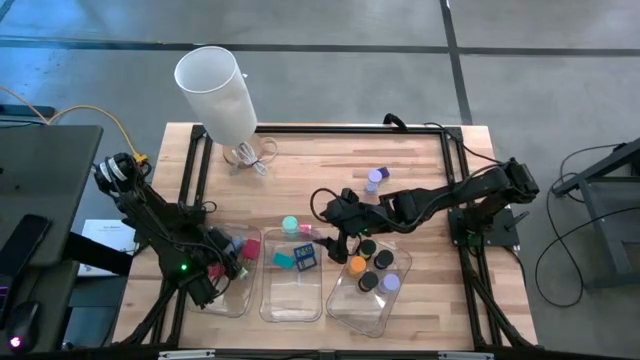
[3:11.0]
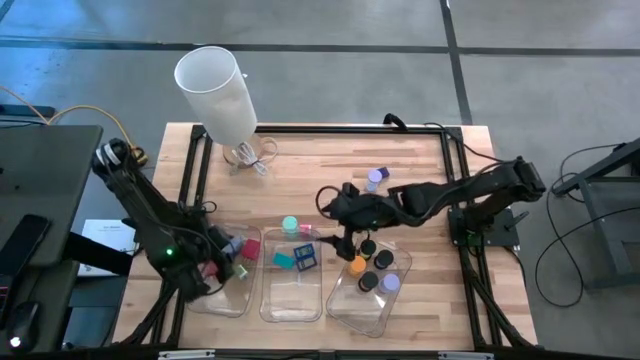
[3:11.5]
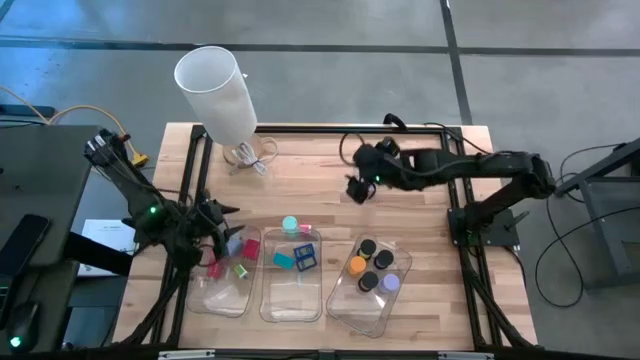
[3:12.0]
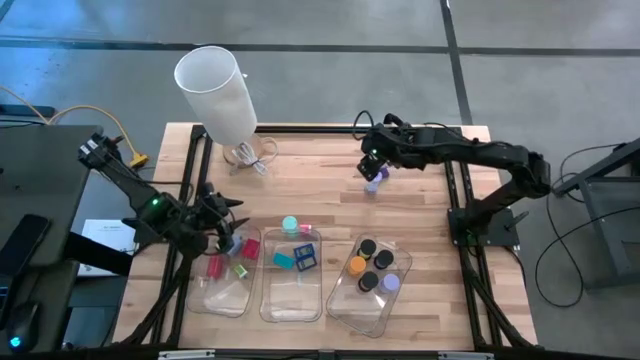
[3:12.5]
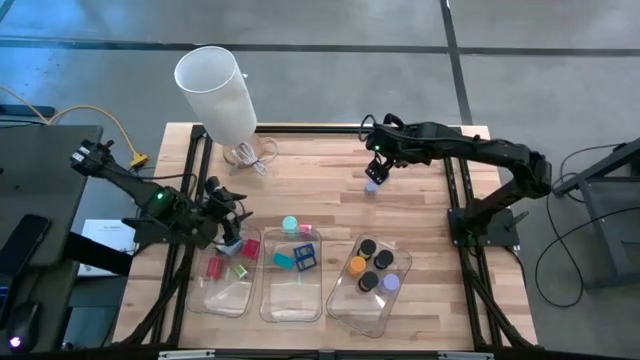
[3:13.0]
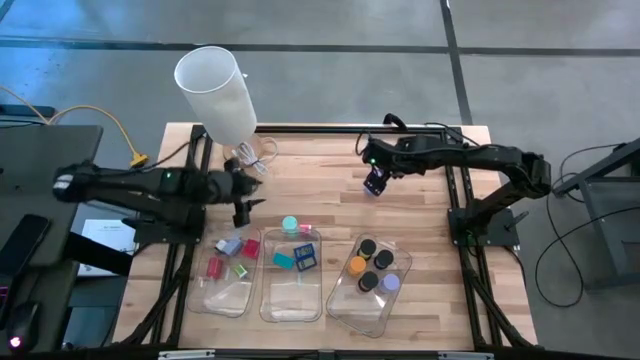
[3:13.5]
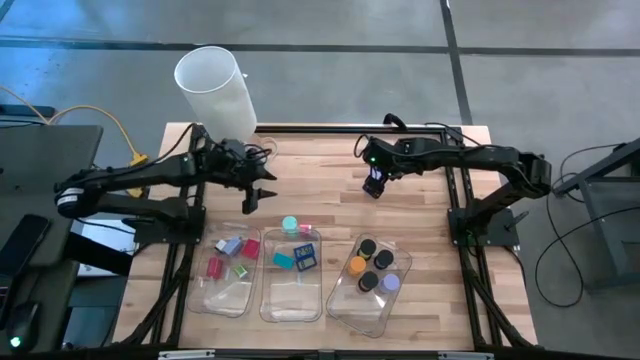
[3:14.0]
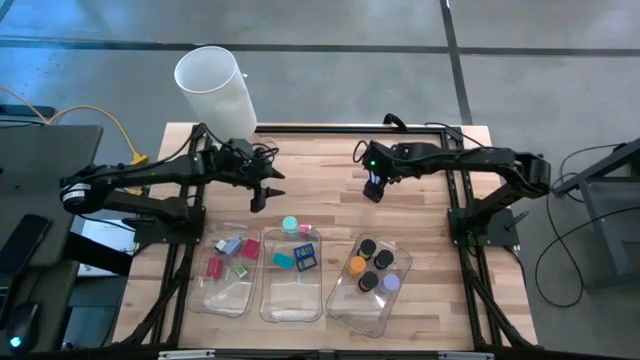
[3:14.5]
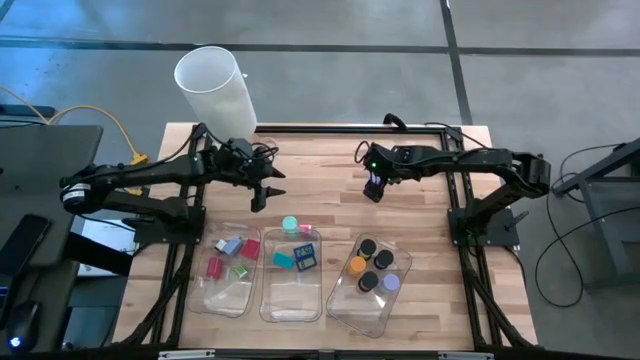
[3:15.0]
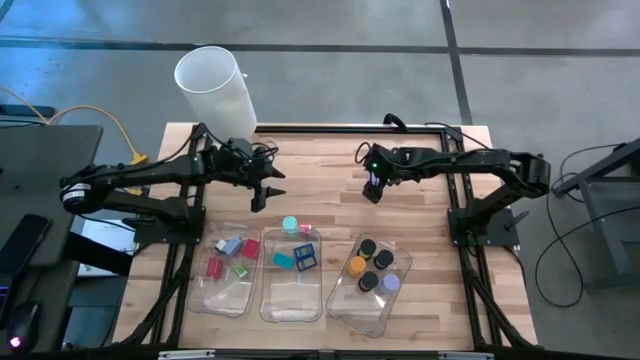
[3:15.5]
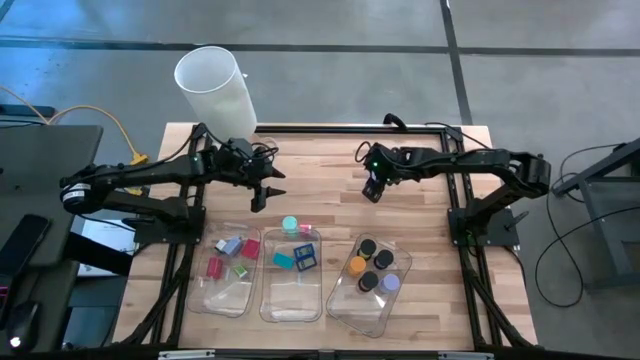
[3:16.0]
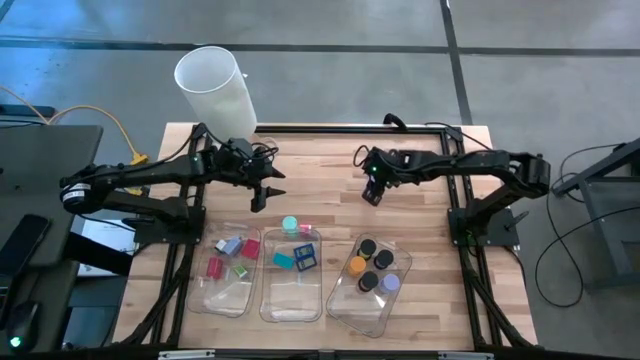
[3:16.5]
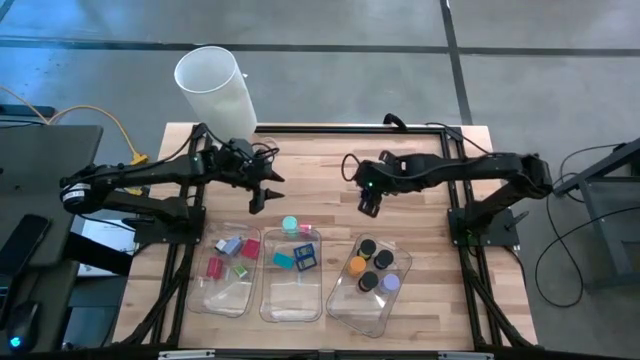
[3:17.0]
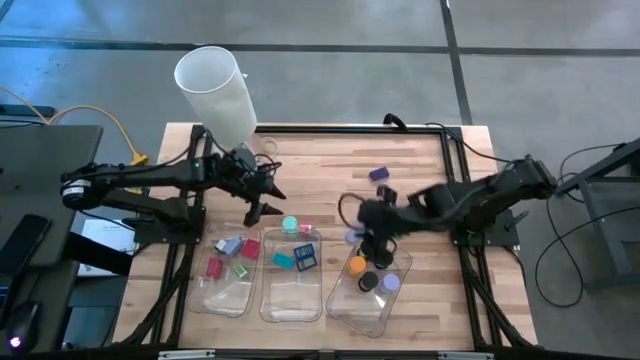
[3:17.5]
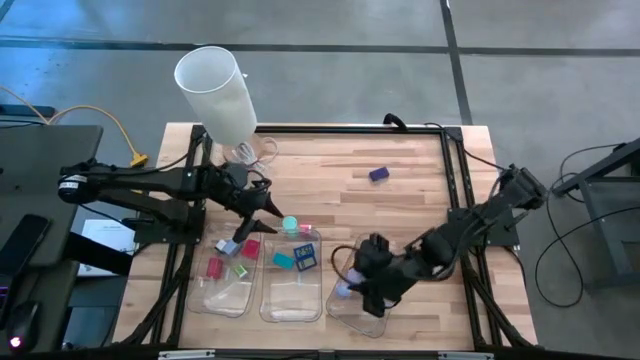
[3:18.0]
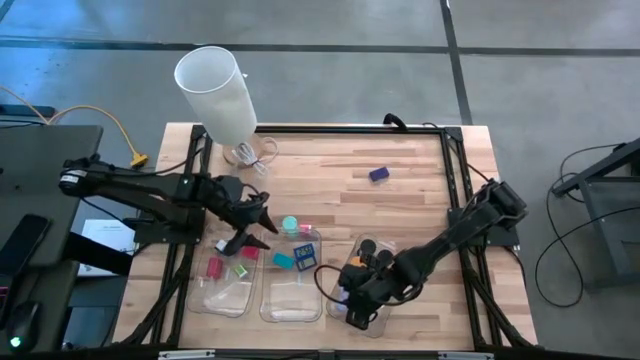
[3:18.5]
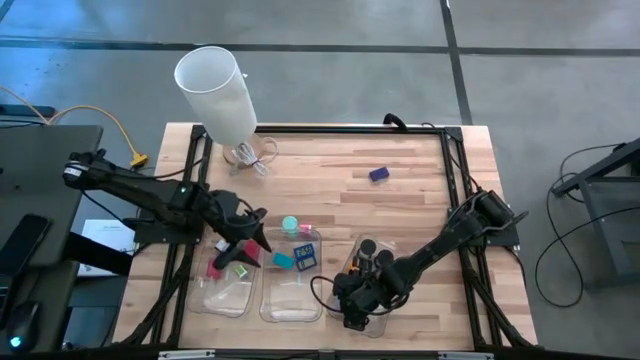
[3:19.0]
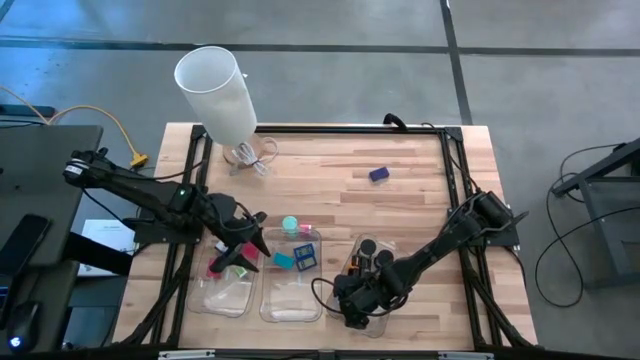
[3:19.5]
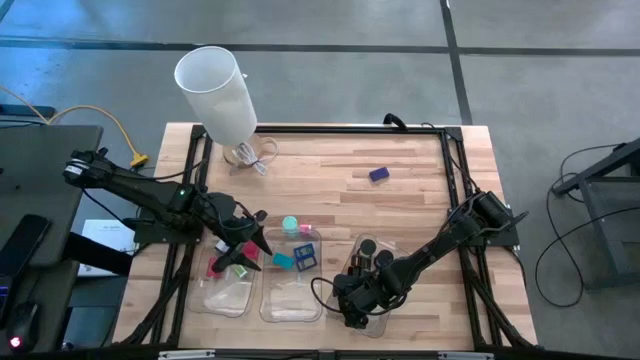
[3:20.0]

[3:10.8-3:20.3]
Task: Pick & Place Office items
Put the purple hourglass into the right bin

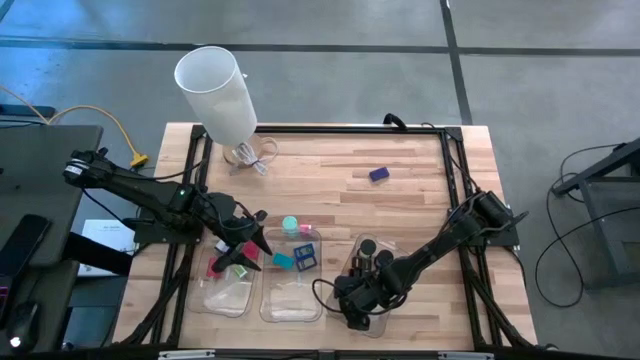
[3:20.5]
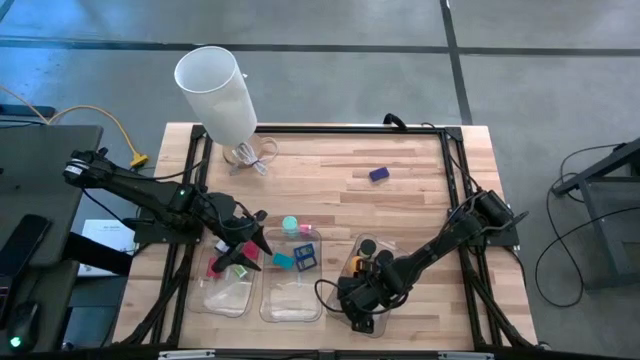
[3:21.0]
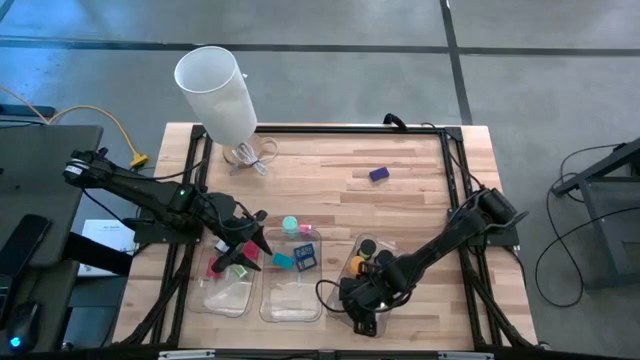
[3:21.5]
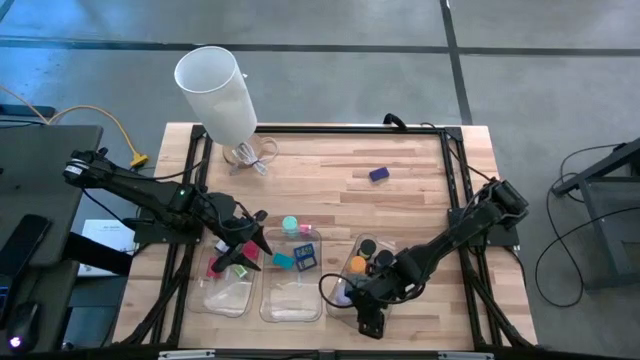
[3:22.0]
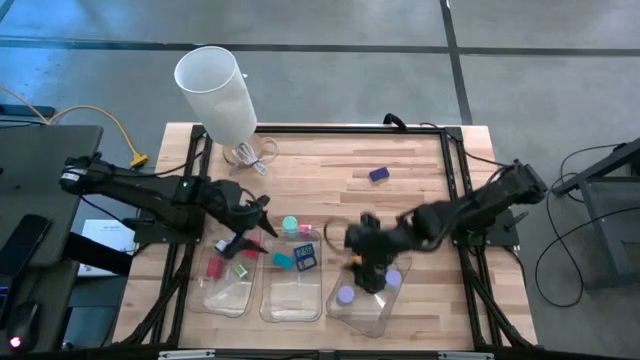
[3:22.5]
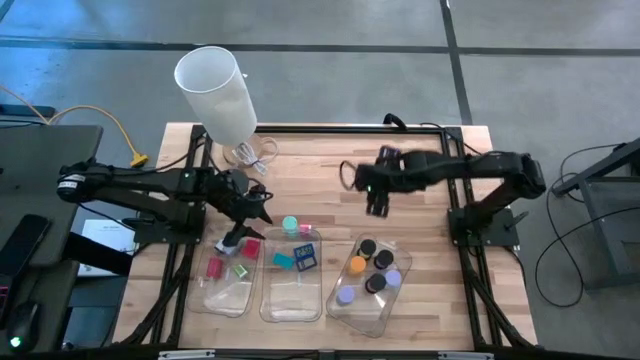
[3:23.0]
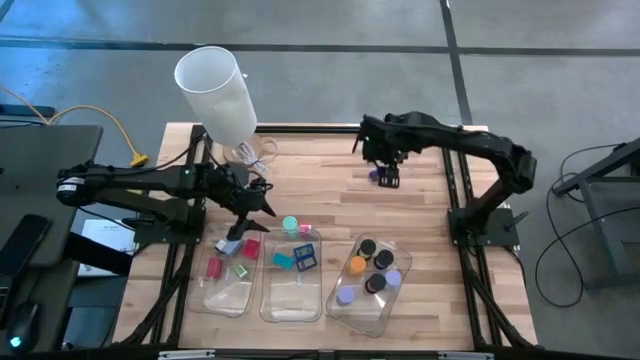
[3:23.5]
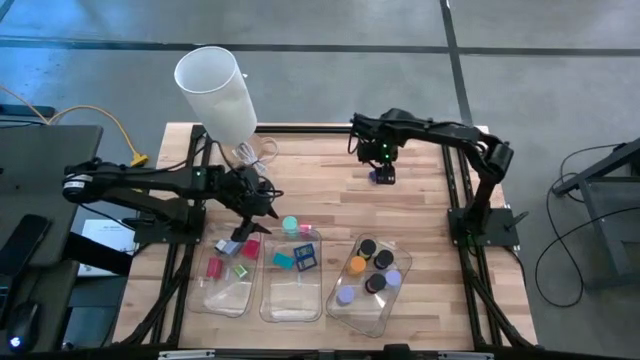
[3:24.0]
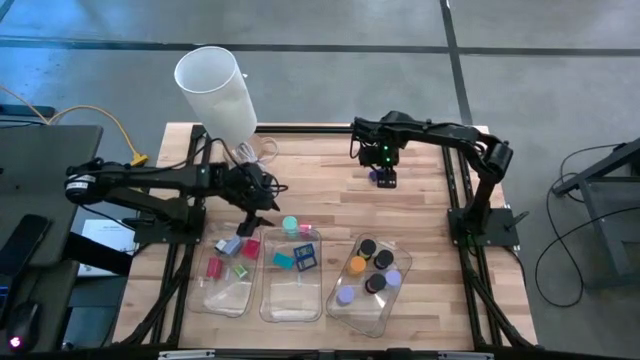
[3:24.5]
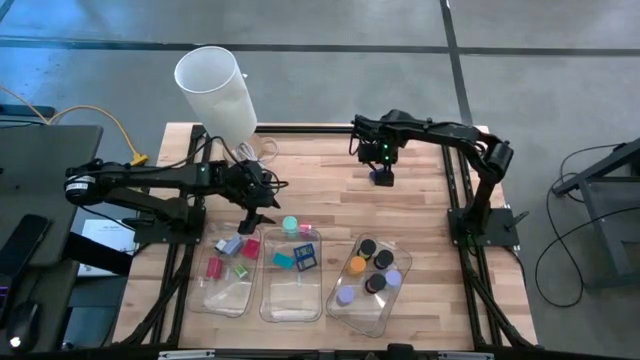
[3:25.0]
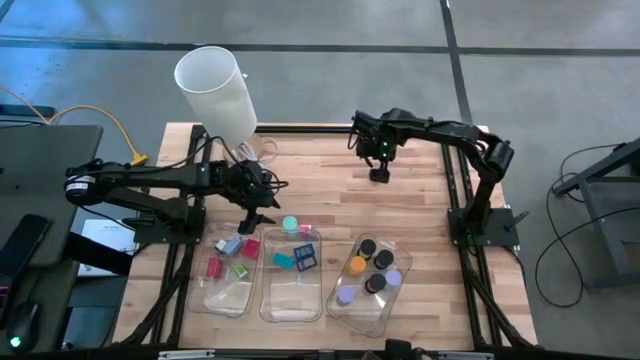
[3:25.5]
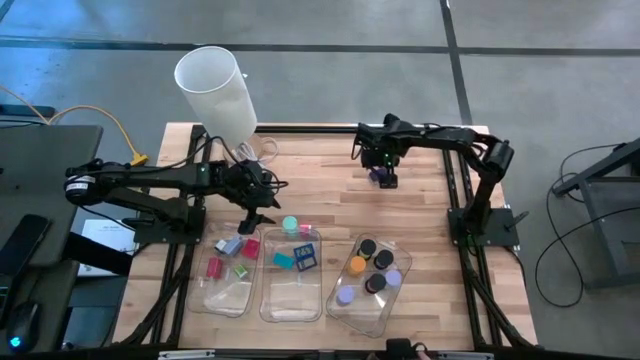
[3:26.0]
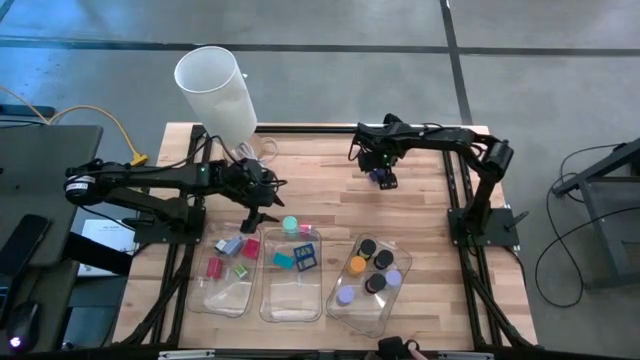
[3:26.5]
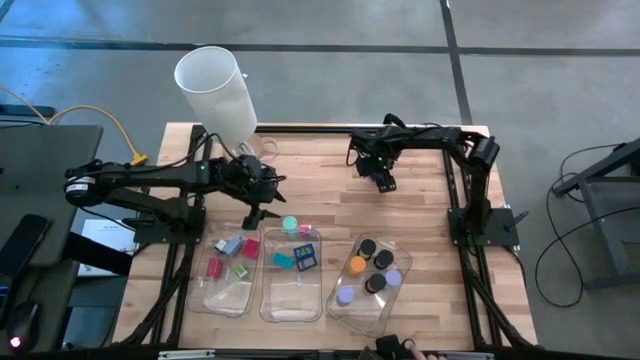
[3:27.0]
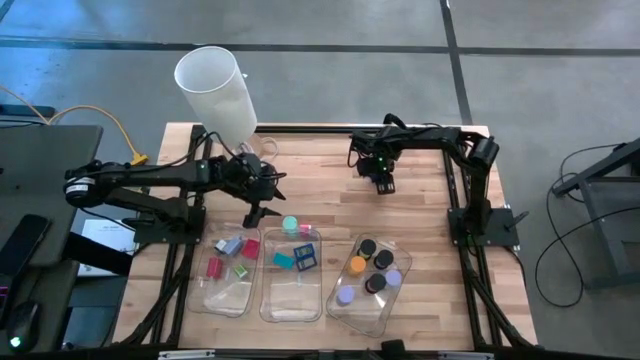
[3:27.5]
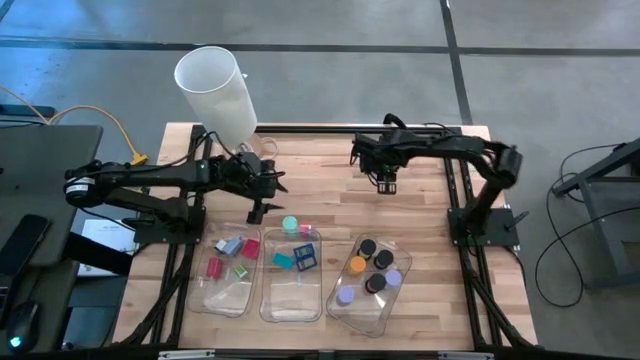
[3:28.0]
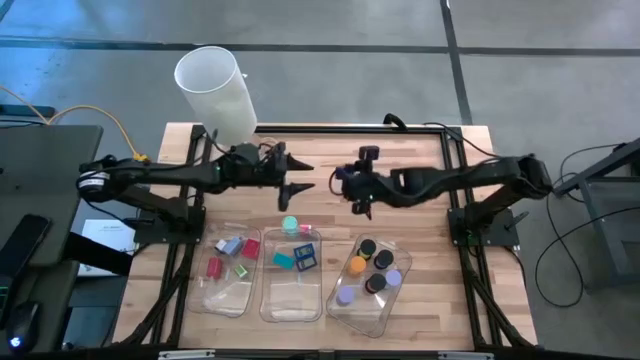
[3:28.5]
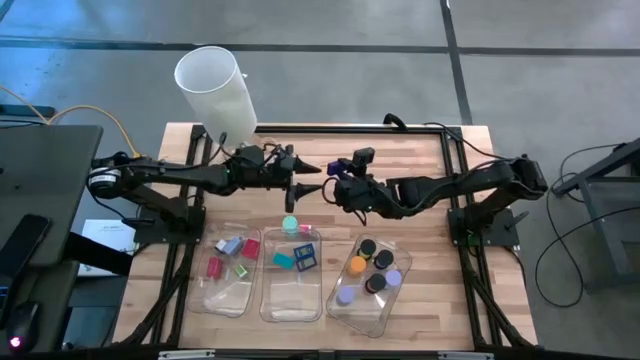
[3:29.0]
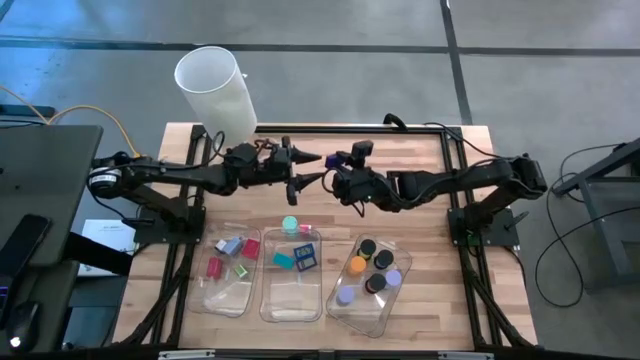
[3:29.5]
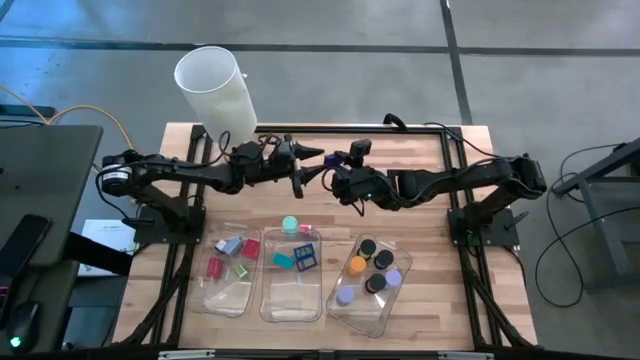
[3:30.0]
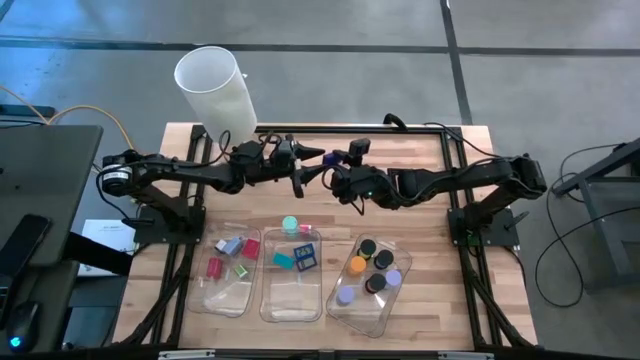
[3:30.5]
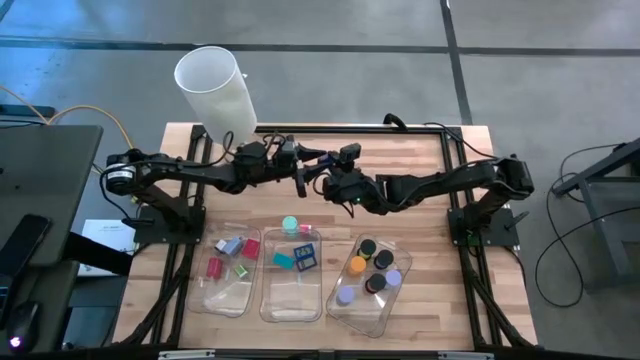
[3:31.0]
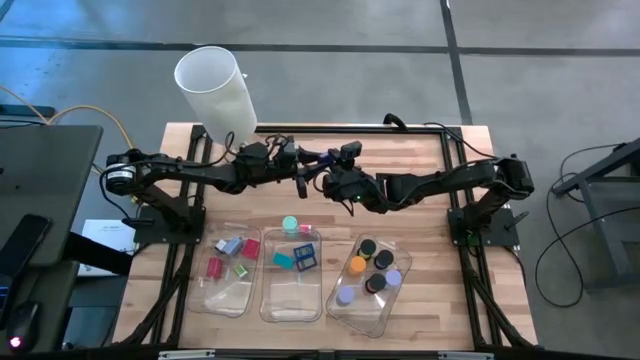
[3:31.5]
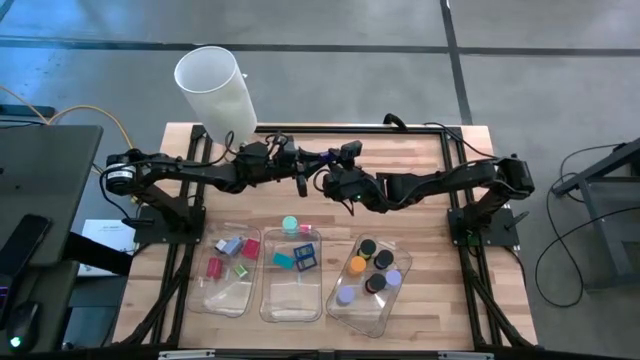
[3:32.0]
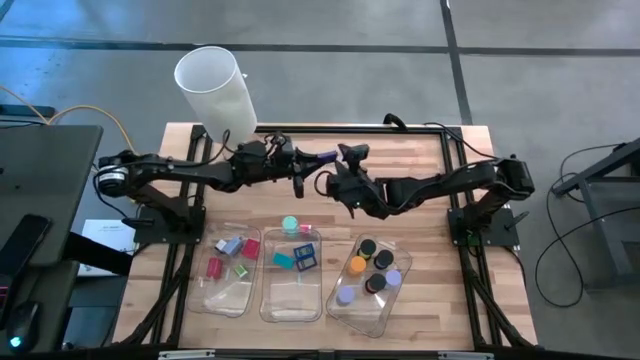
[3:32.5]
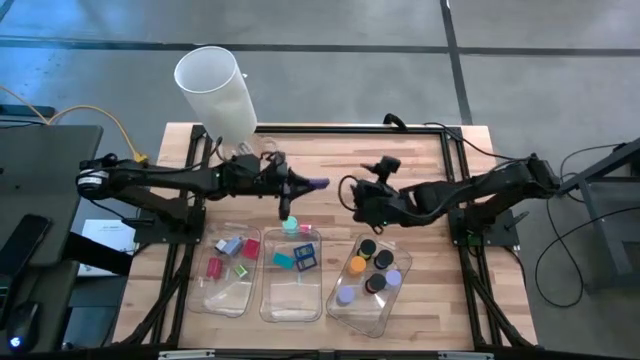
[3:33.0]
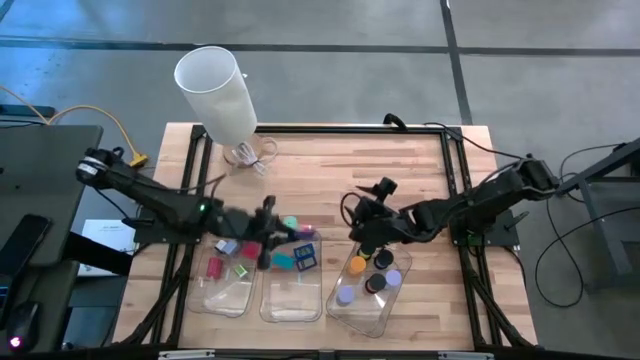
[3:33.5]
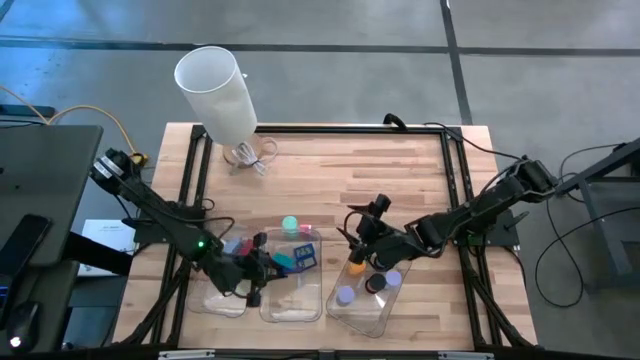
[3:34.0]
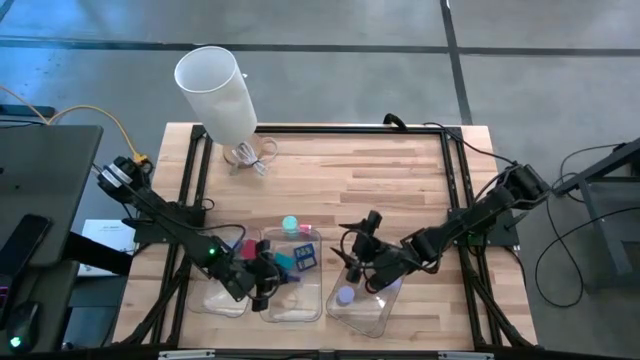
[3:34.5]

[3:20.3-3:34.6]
Put the blue digital clock into the middle bin
